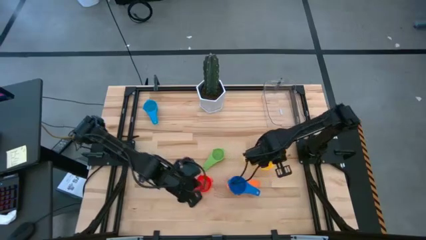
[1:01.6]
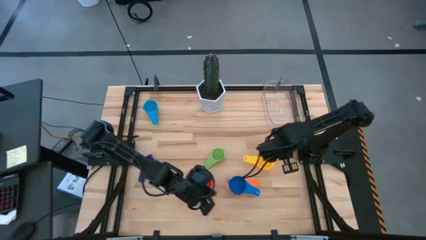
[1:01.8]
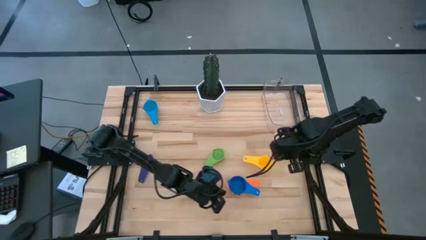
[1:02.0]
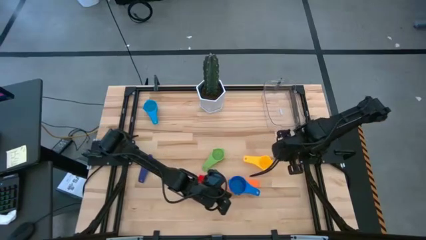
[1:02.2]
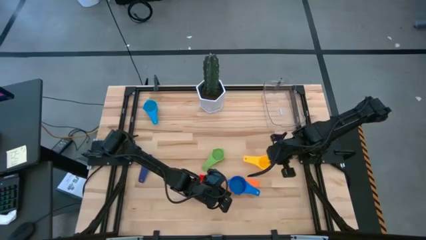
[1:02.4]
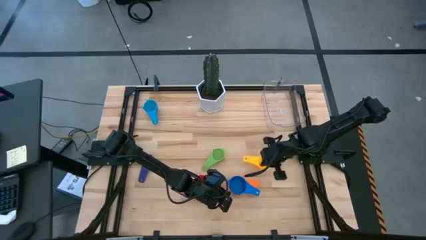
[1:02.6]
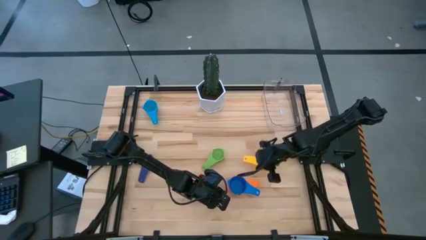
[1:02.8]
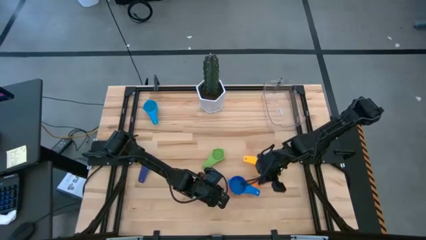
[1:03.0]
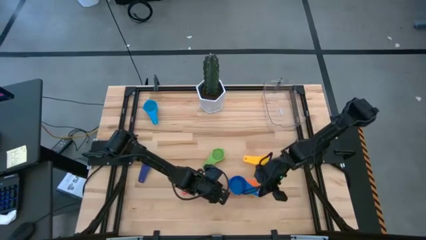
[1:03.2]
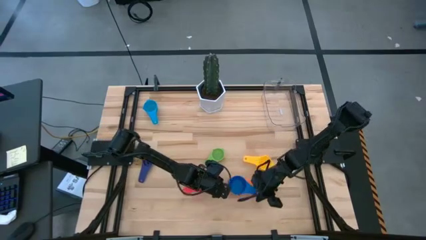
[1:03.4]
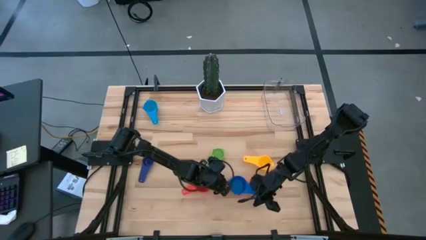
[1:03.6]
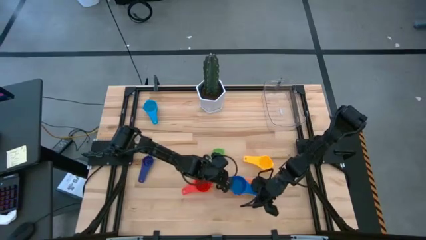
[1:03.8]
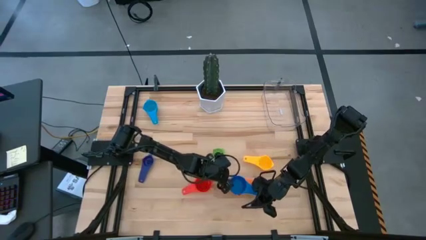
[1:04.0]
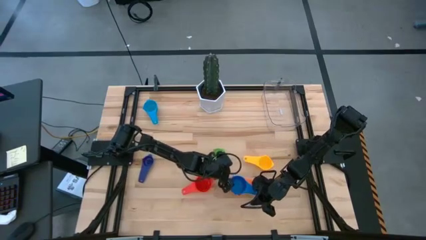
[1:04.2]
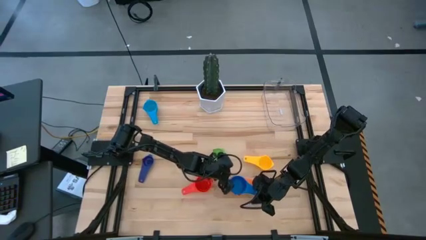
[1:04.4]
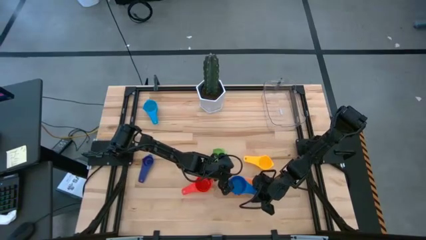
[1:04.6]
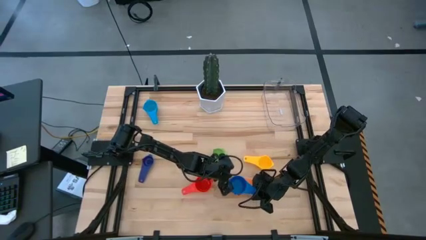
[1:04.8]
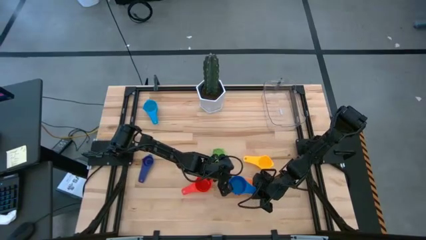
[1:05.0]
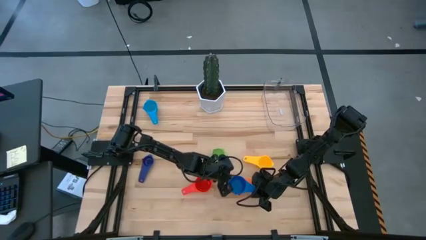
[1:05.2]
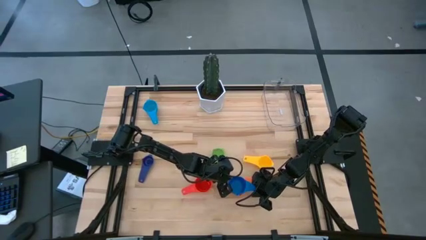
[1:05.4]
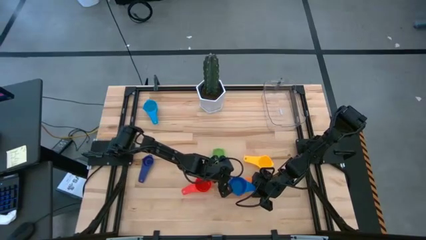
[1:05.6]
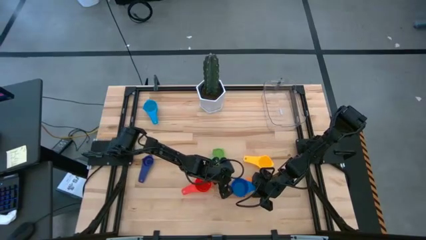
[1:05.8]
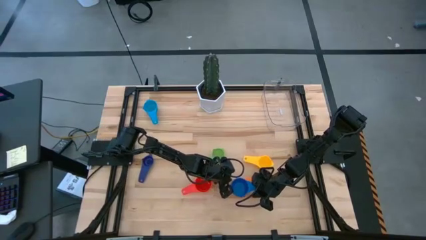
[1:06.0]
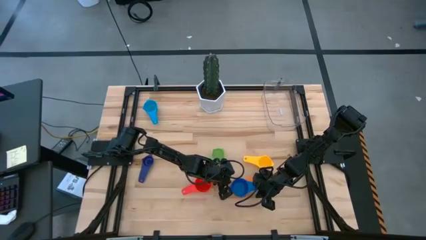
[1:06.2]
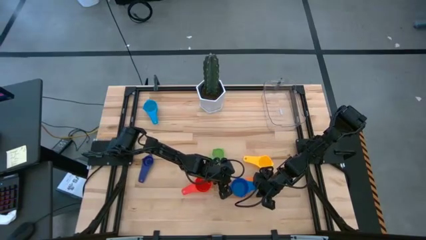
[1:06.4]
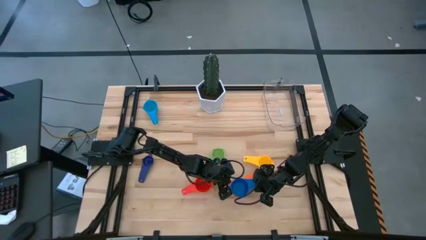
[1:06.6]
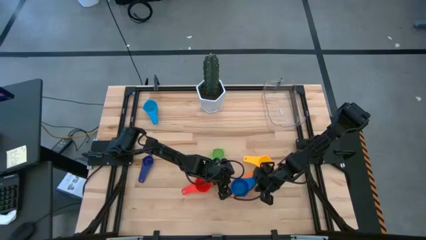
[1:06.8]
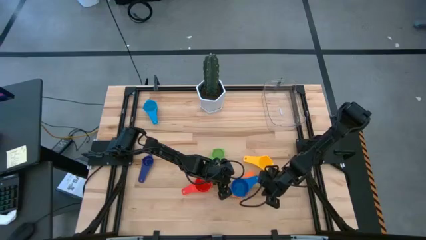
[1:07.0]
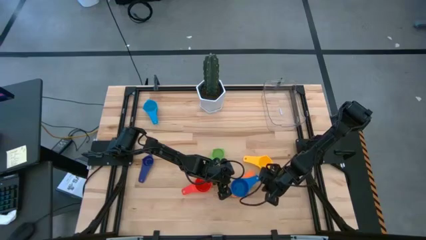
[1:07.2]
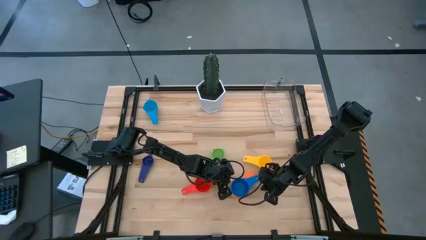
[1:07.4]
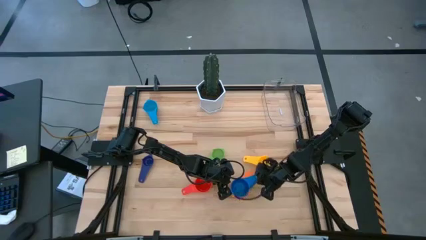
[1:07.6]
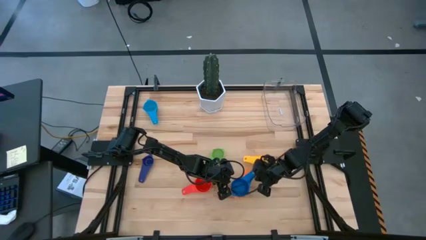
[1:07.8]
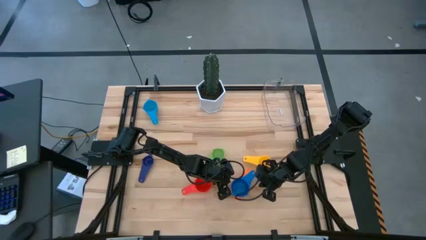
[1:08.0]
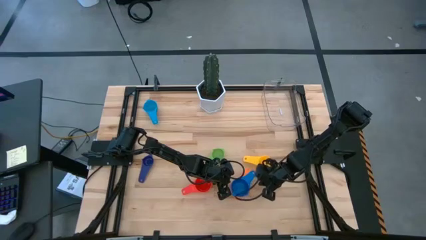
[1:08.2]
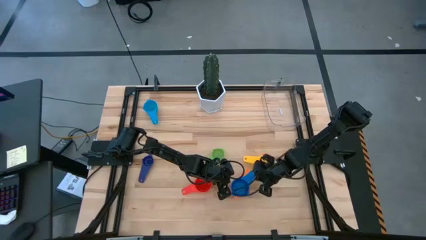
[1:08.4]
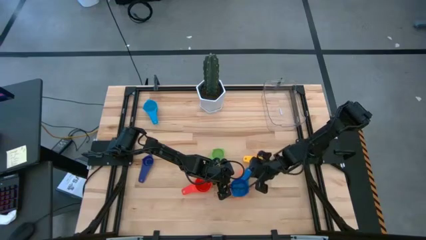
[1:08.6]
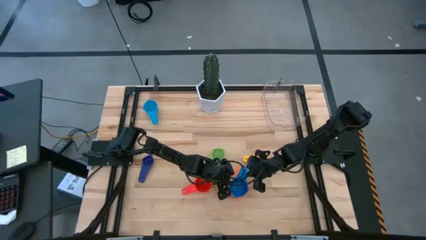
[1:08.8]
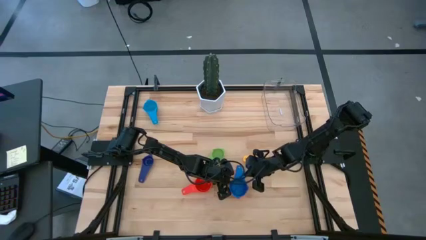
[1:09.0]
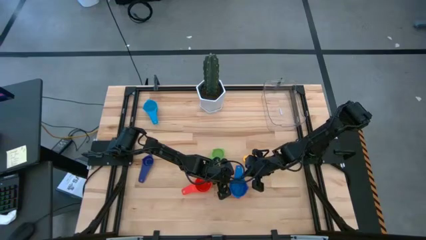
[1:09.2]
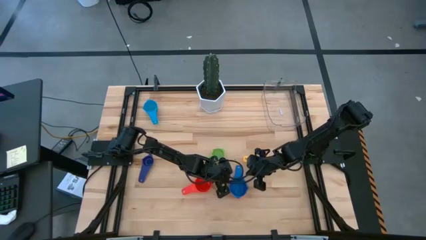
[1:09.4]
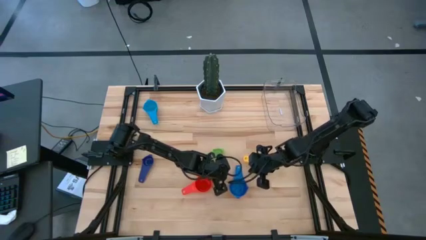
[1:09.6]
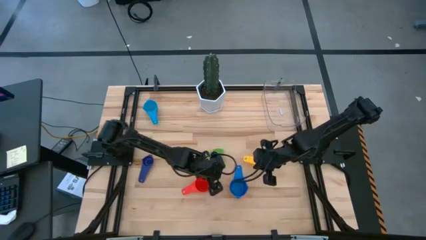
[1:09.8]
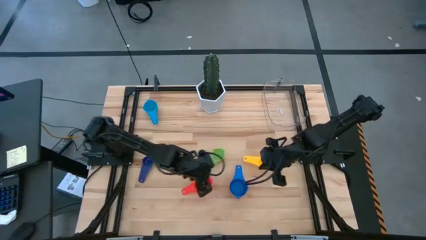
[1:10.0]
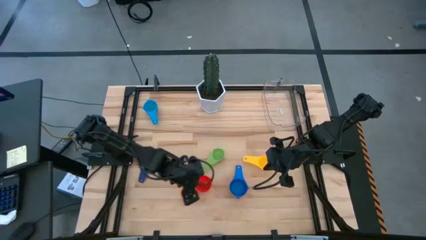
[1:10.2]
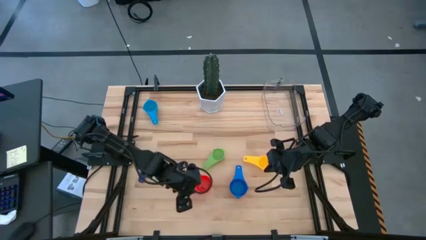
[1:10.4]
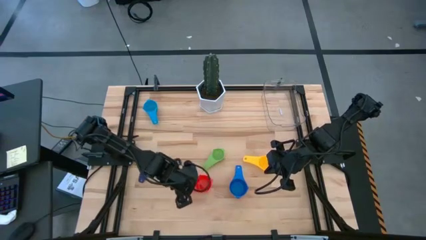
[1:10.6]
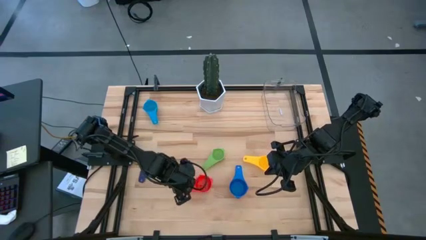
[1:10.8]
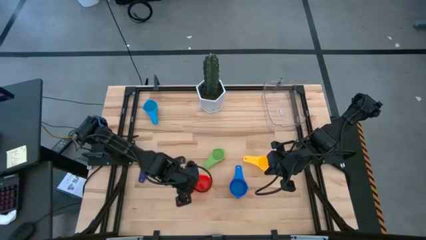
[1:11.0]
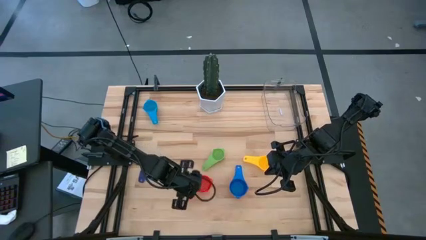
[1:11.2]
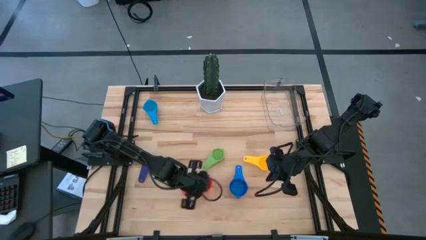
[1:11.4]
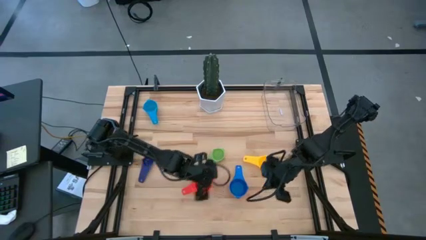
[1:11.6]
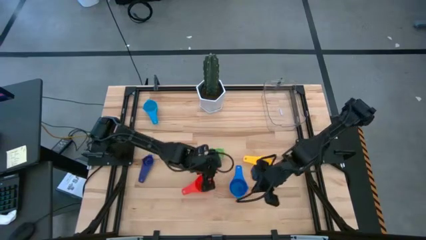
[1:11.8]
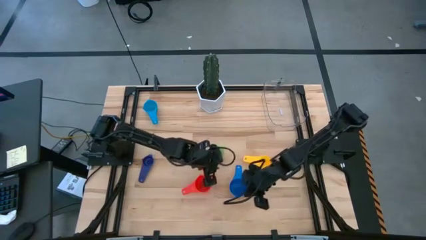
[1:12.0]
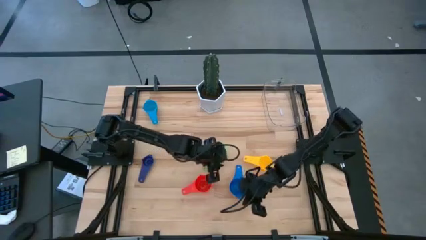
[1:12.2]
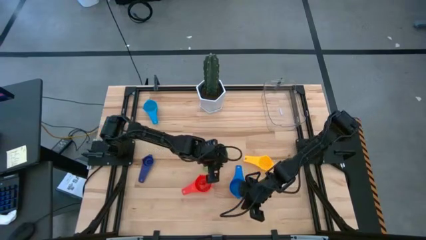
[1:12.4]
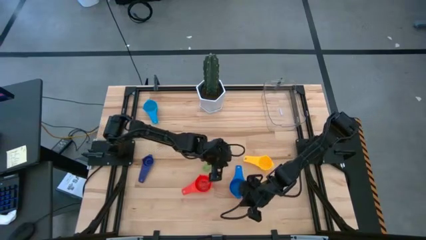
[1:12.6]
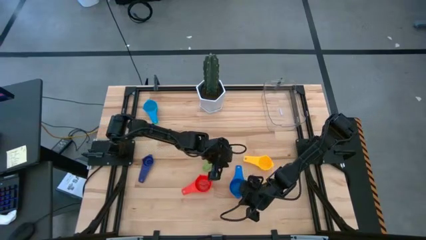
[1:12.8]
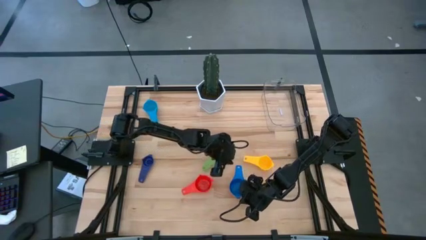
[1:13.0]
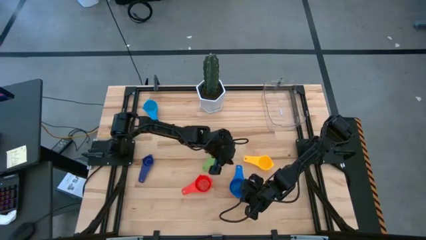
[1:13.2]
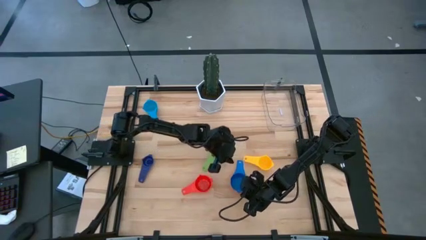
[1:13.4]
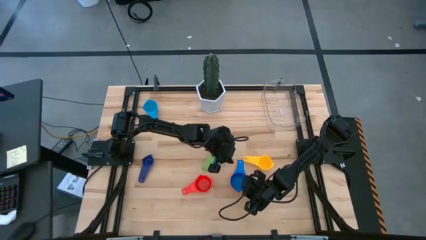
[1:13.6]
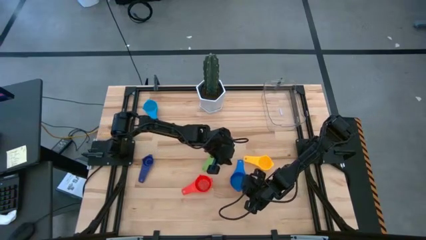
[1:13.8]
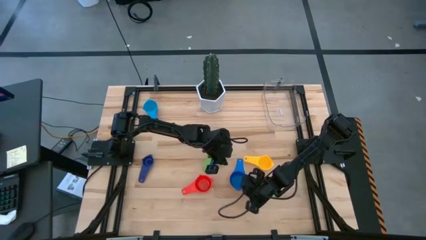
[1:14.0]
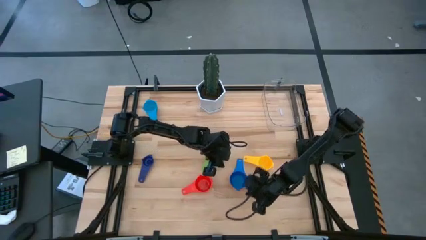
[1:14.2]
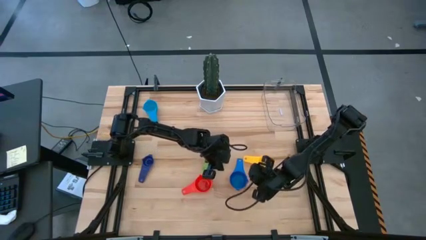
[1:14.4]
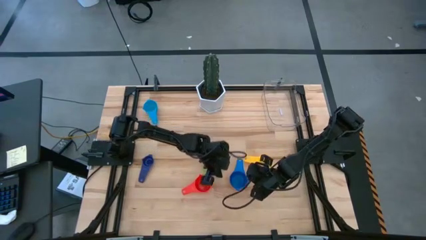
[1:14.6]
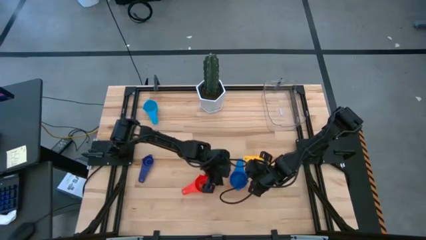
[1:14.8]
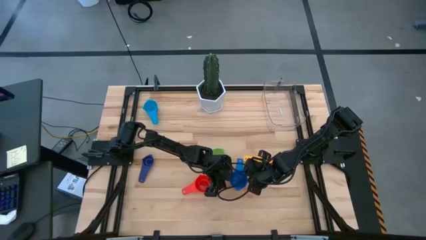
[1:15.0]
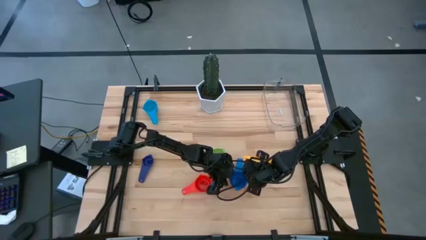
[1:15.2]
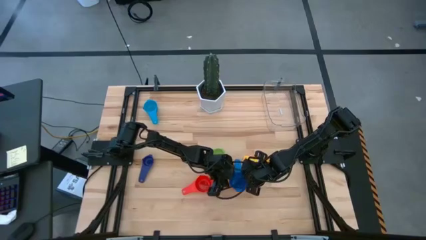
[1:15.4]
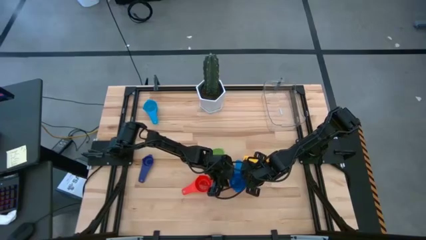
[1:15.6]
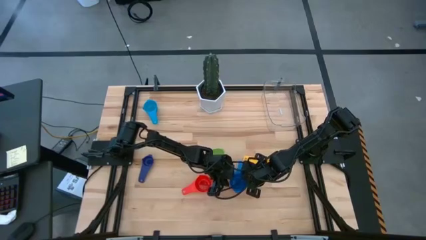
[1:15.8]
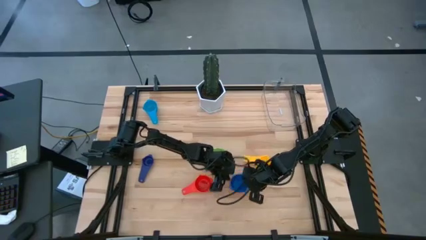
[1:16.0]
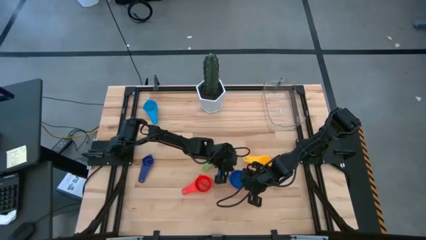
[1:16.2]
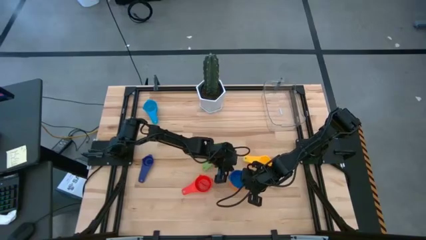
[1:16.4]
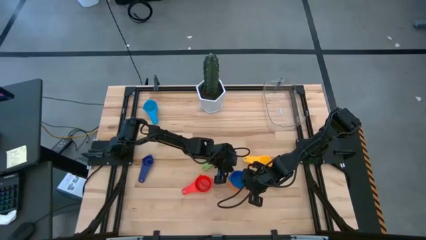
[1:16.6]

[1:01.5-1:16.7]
Task: Nest measuring cups in basket
Adjust the stacked measuring cups
